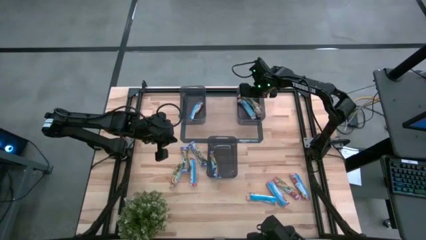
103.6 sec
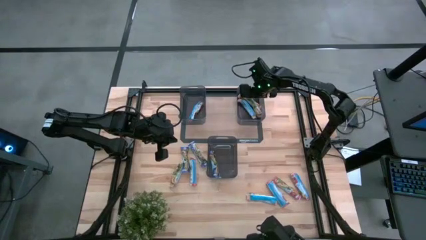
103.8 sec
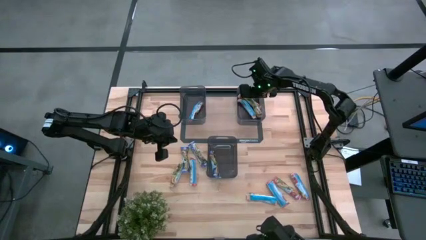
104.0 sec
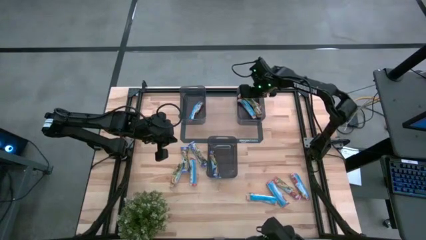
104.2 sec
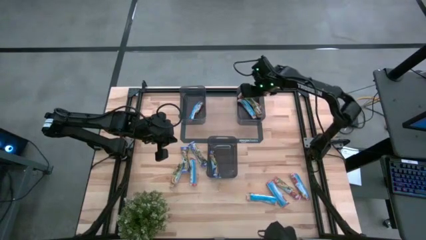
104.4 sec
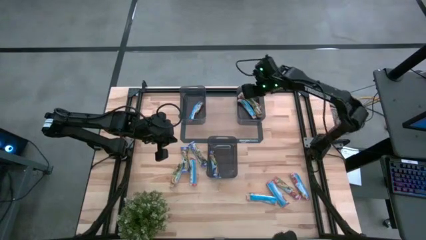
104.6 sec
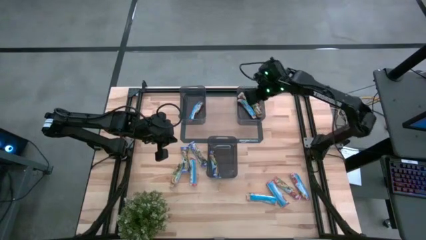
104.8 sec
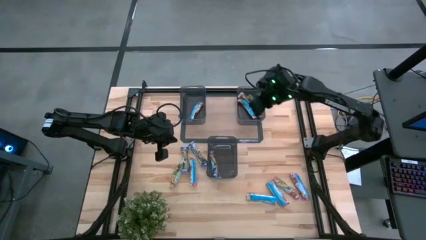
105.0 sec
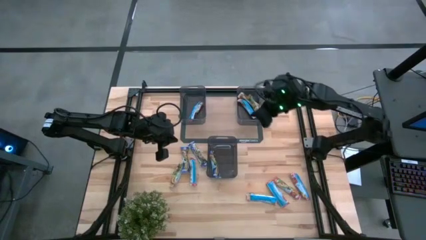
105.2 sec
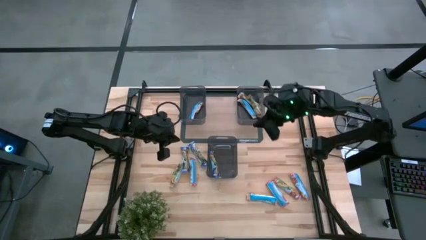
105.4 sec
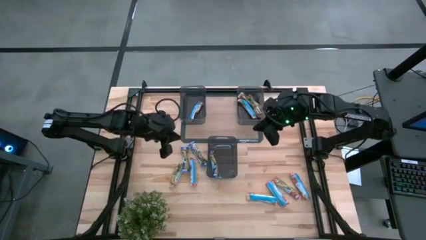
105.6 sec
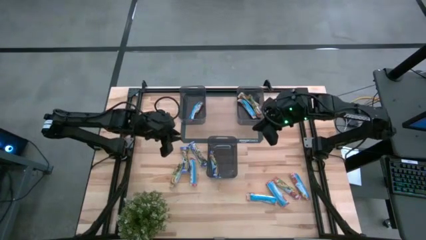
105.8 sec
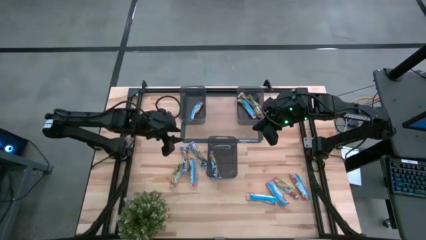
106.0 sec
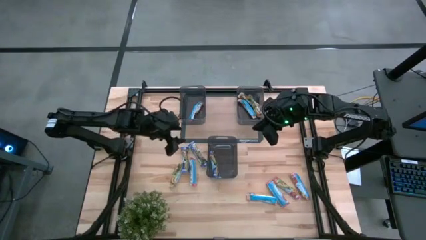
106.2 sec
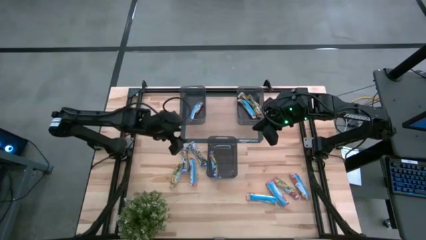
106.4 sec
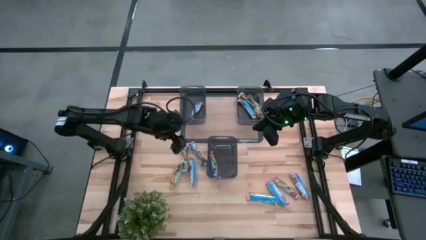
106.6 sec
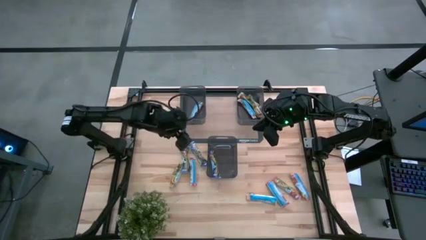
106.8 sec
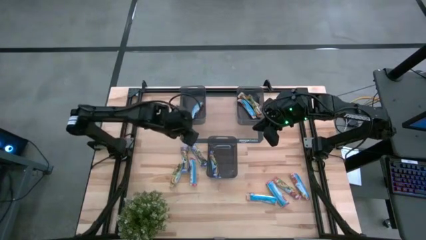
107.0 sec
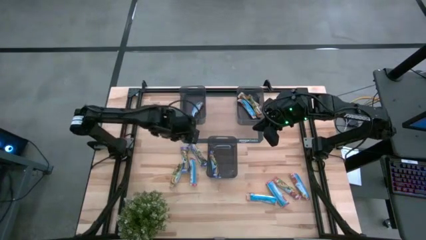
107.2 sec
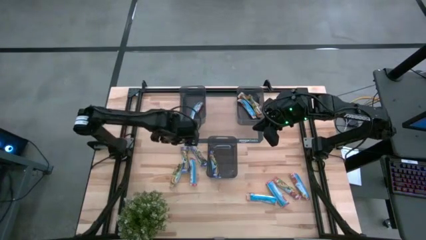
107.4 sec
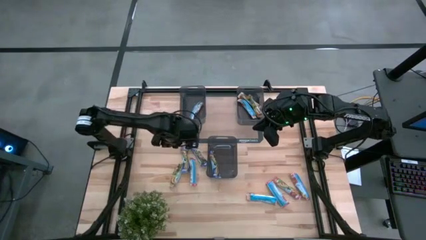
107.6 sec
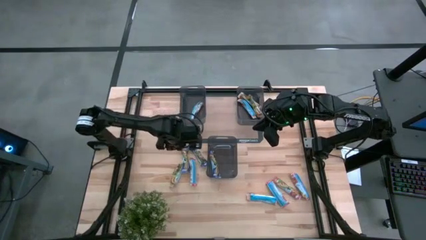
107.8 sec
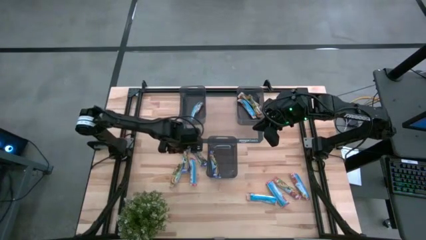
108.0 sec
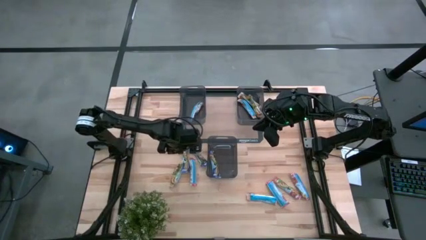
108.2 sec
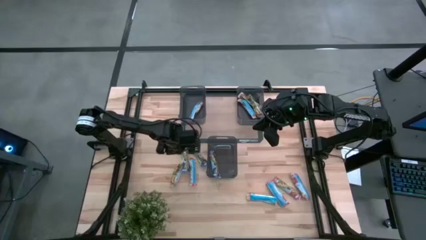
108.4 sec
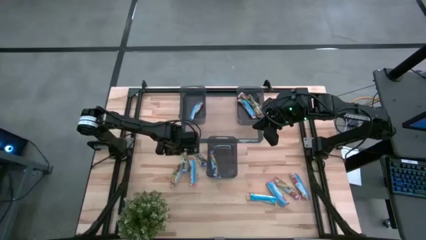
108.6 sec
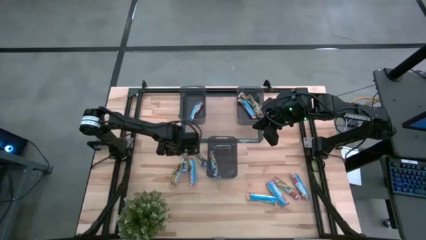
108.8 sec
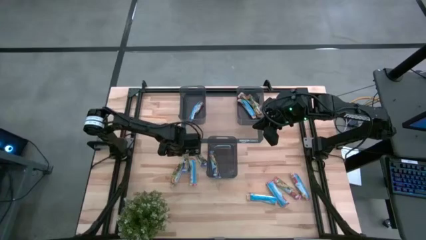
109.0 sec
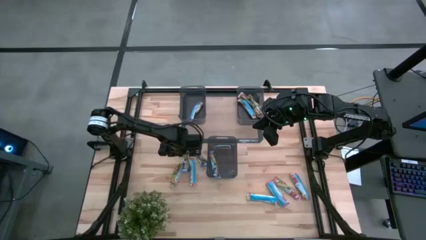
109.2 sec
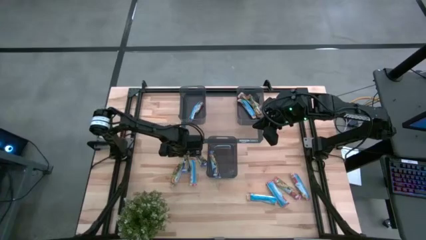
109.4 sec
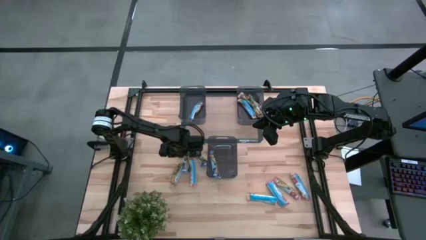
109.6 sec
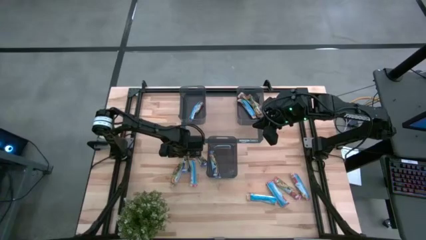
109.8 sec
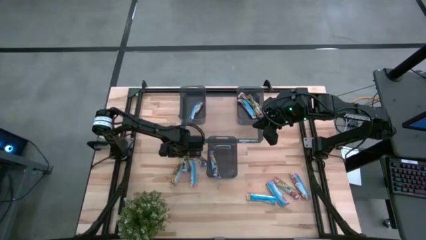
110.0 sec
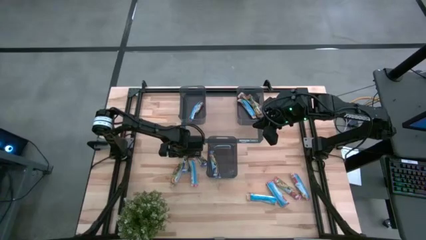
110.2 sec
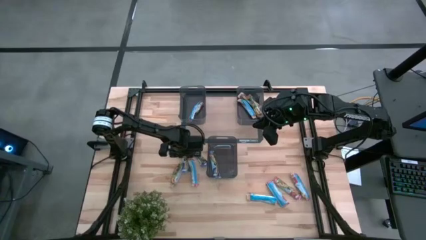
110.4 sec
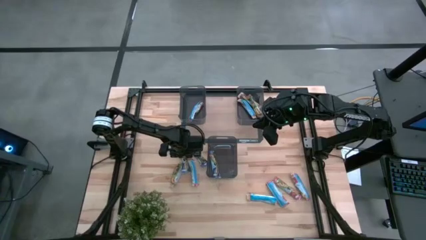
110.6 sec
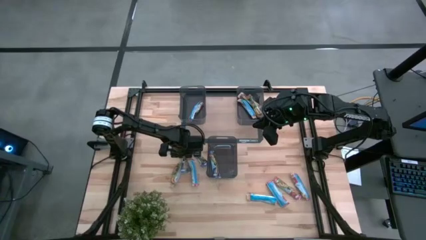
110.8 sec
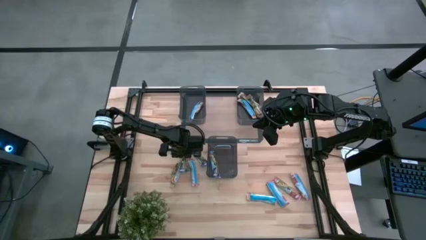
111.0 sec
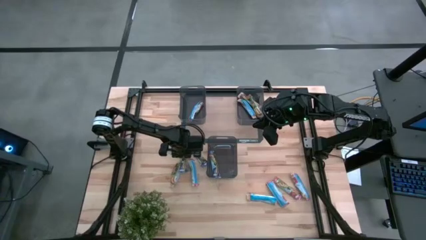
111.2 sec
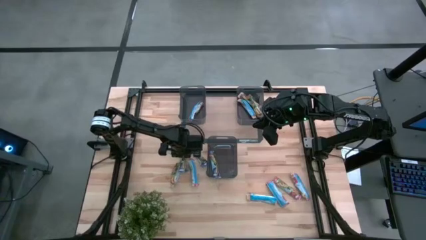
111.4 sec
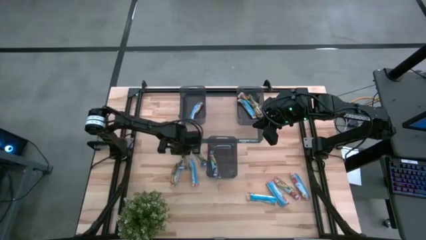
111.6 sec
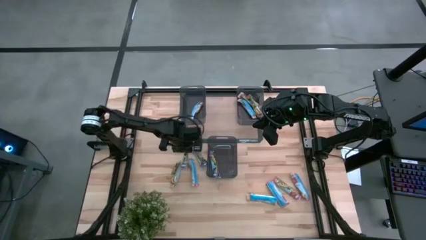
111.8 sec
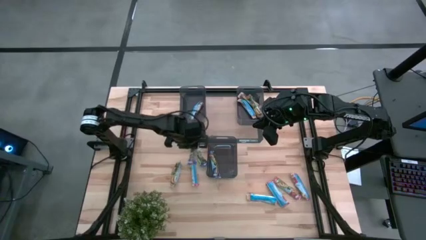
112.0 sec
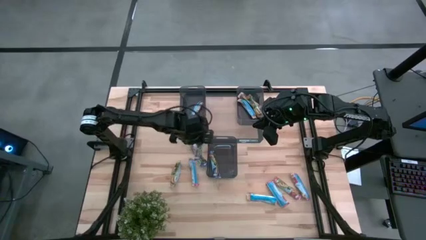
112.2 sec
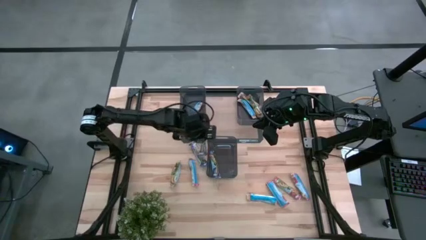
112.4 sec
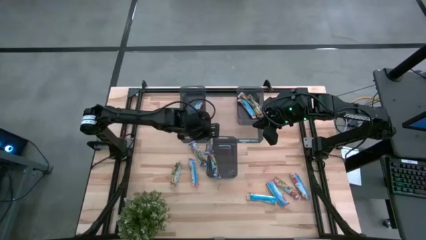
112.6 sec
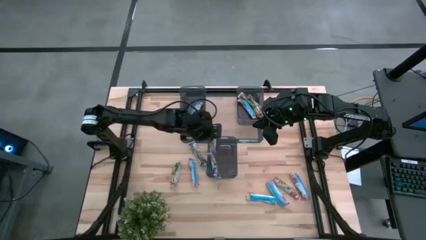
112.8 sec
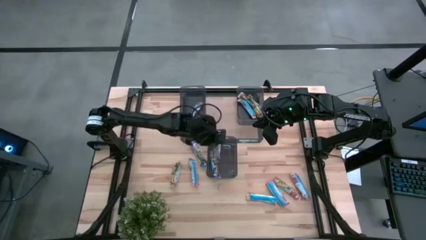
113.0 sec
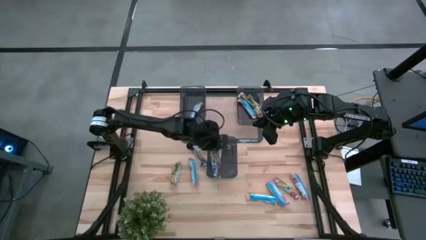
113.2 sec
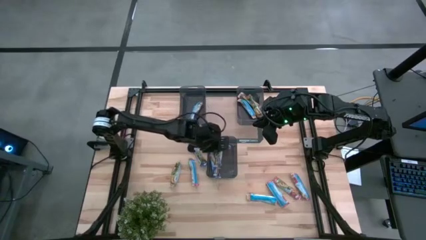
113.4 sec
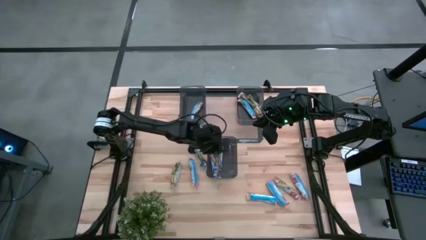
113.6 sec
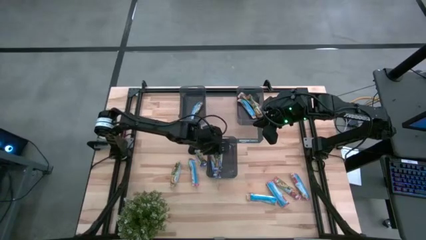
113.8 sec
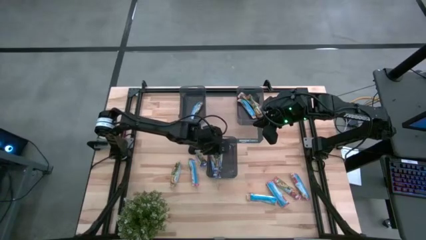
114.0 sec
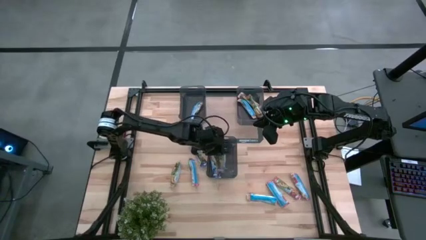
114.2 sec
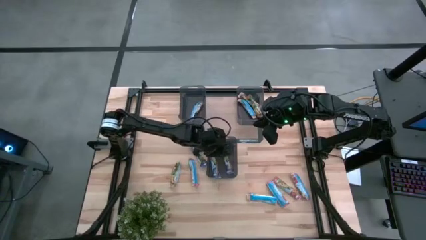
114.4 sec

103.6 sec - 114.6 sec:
Task: Pick and place Granola Bars by type
Put the blue granola bar into the bottom black bin

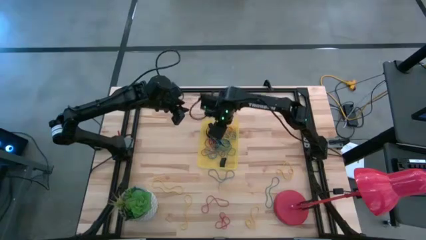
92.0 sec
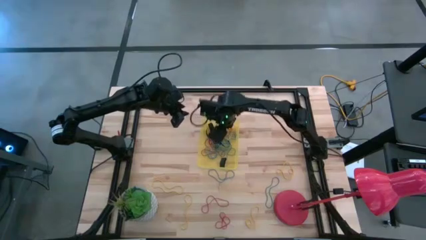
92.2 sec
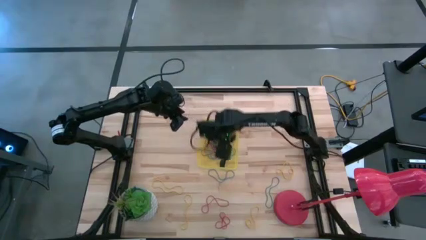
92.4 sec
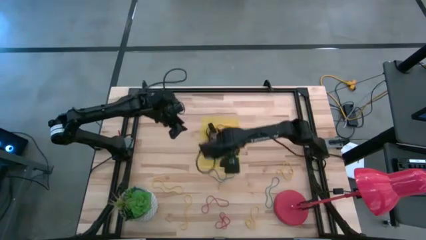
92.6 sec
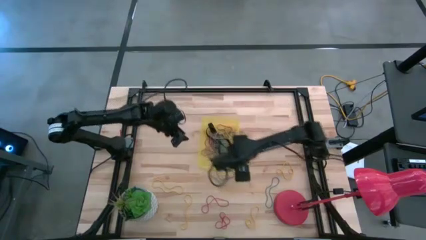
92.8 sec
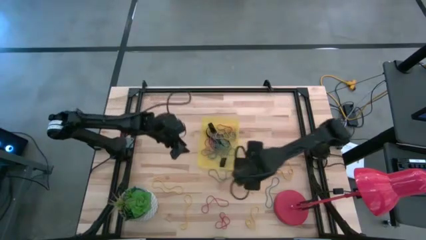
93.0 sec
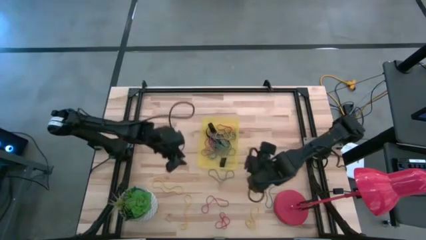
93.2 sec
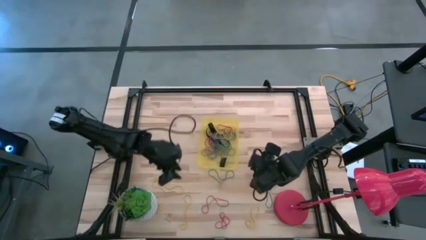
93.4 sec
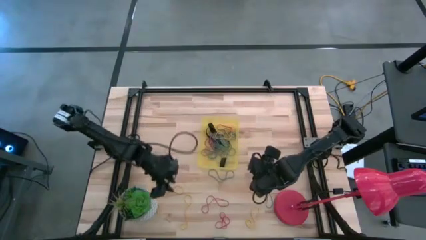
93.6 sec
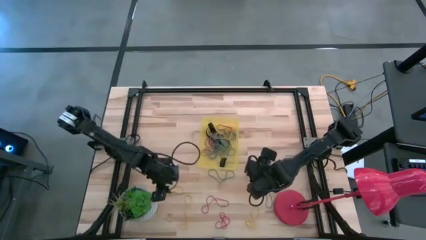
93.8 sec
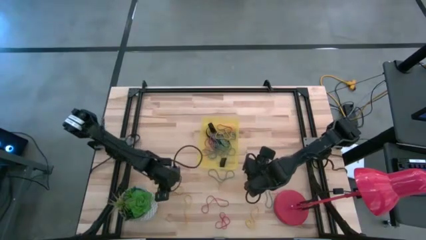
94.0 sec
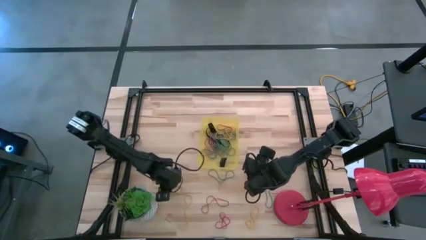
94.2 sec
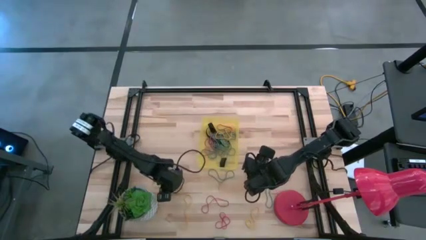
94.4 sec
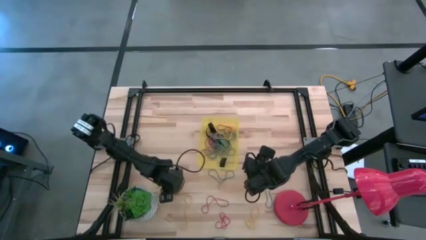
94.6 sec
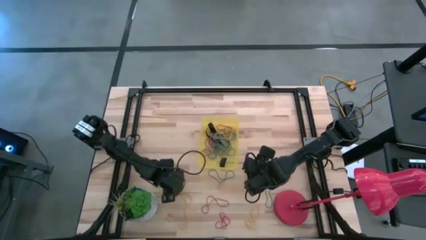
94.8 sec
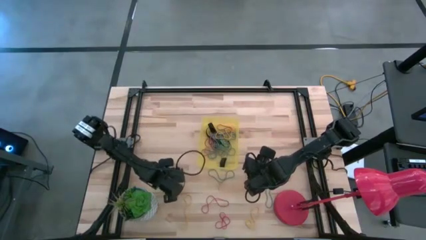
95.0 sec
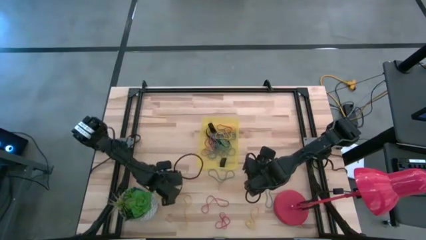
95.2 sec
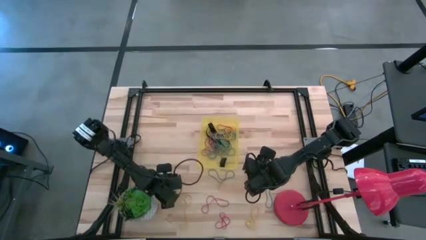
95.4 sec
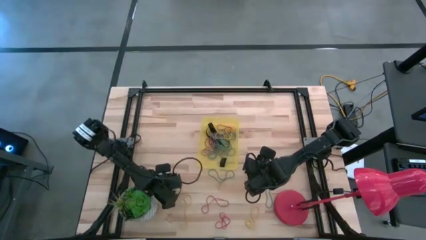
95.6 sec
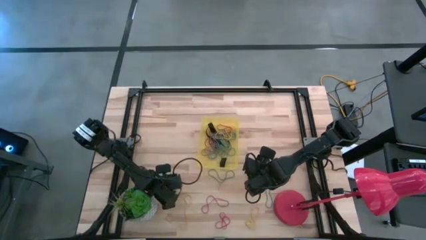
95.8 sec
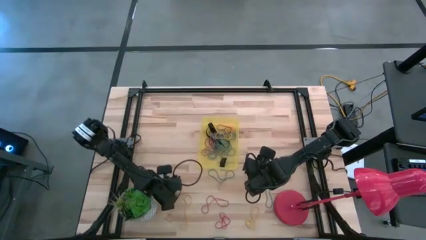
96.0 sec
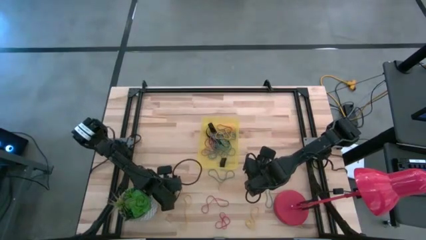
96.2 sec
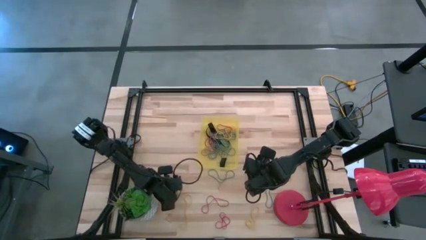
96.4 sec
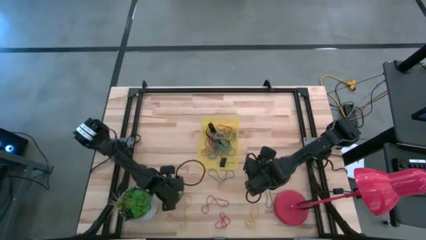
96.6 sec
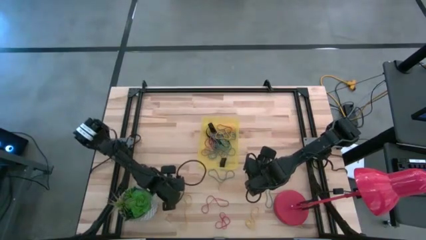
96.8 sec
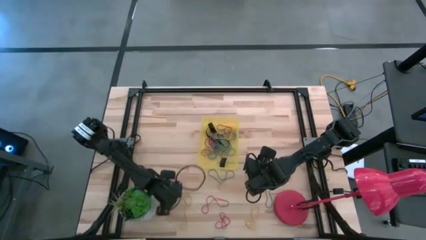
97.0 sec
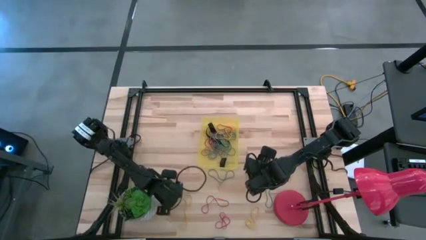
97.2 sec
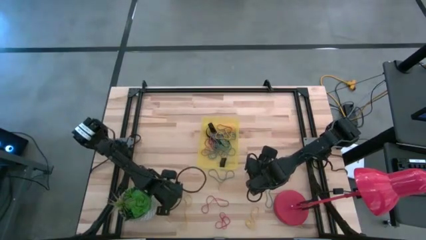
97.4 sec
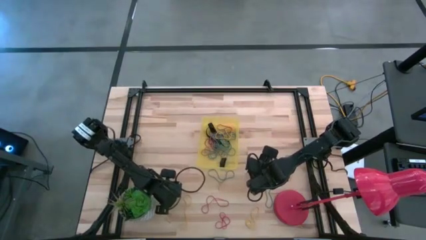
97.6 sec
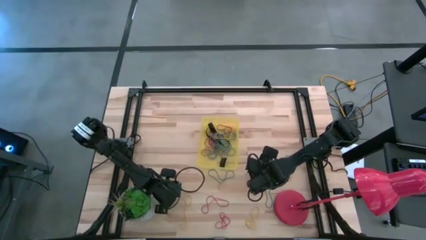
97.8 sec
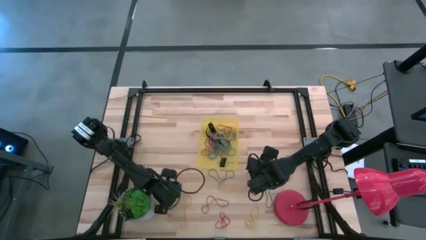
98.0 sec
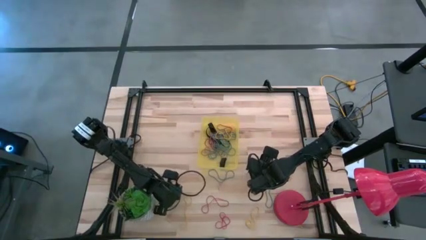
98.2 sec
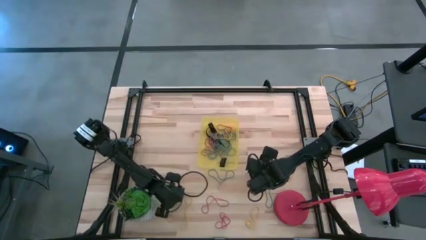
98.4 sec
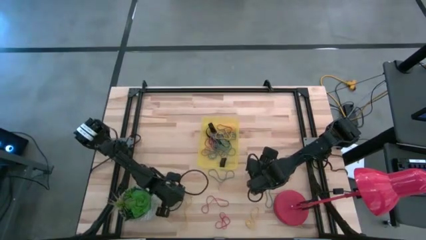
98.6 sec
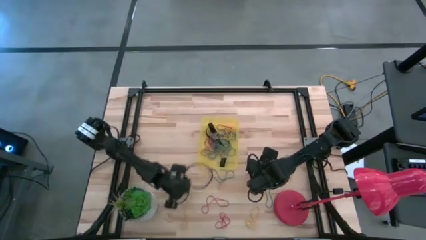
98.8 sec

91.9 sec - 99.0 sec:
Task: Pick and place rubber bands into bin
Put the yellow rubber band into the yellow bin
